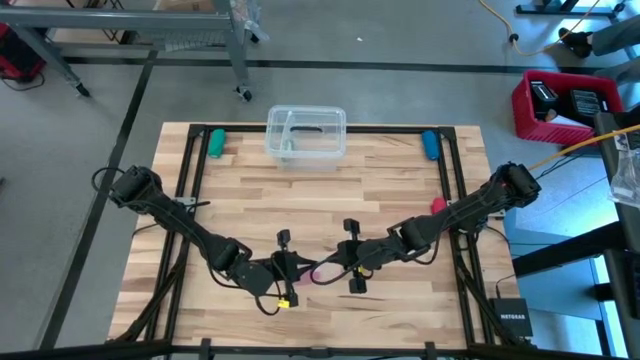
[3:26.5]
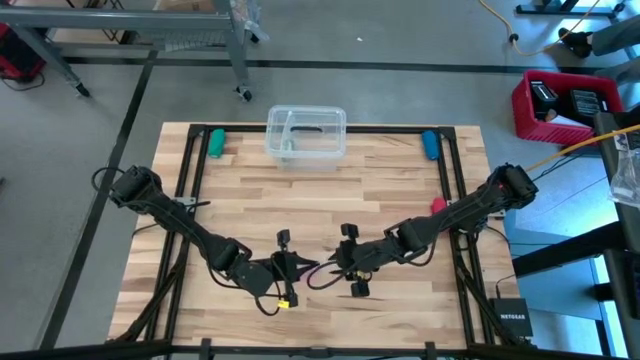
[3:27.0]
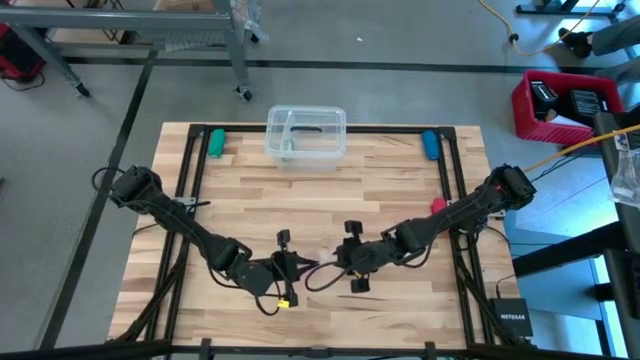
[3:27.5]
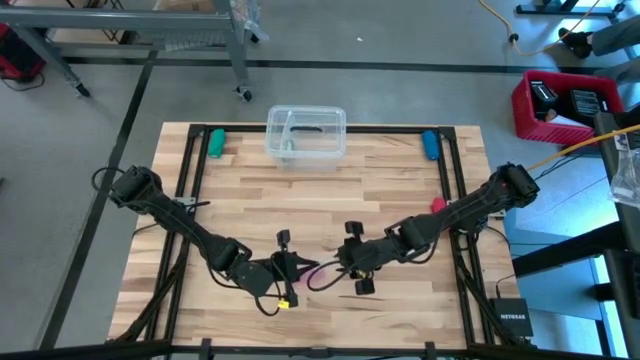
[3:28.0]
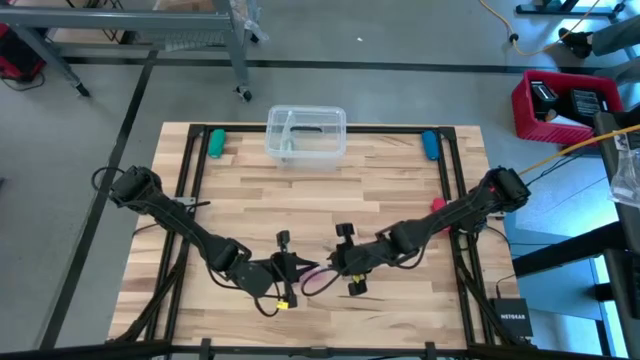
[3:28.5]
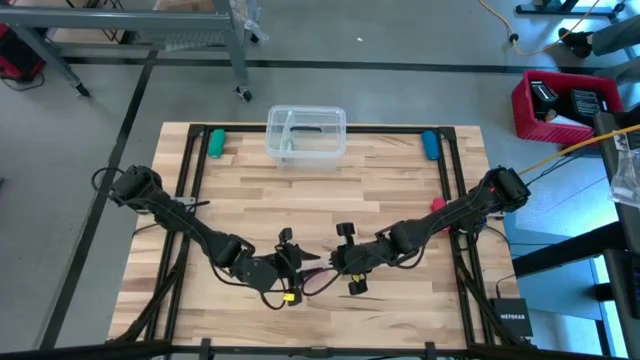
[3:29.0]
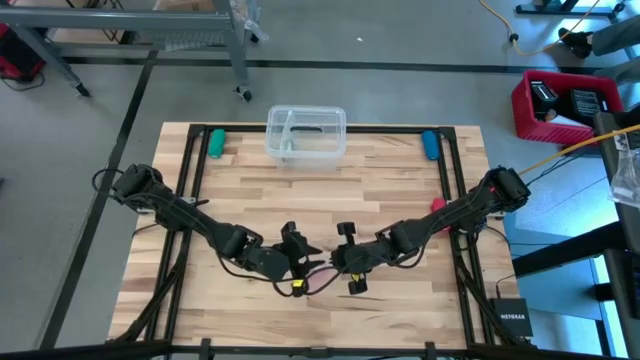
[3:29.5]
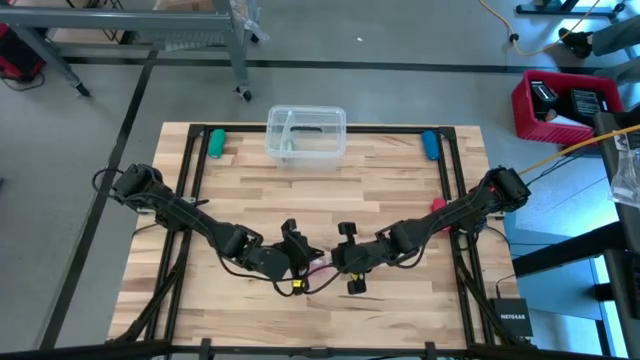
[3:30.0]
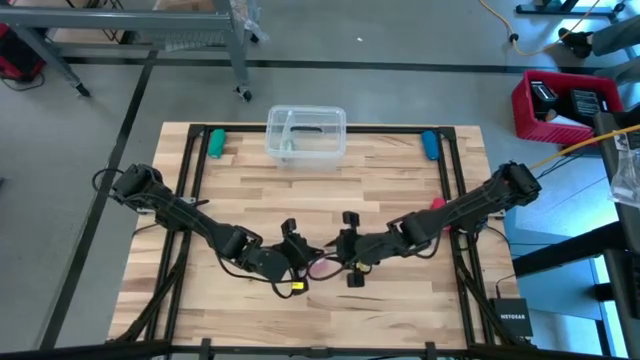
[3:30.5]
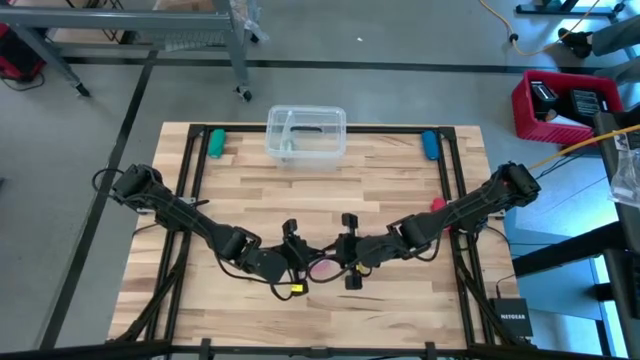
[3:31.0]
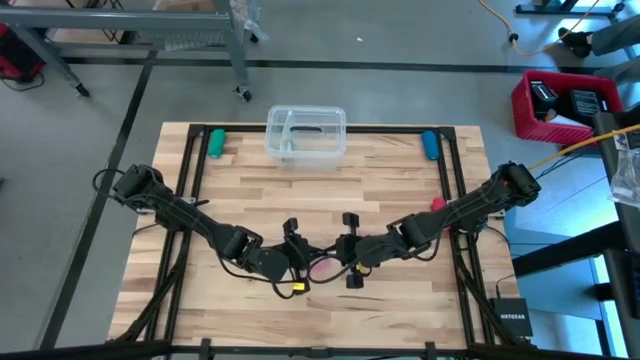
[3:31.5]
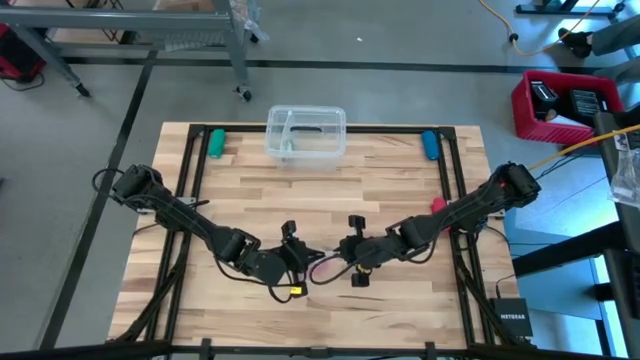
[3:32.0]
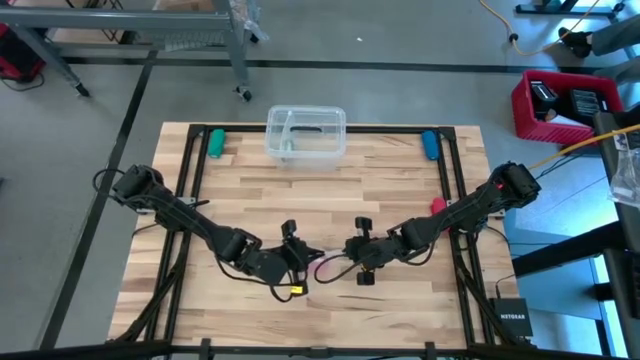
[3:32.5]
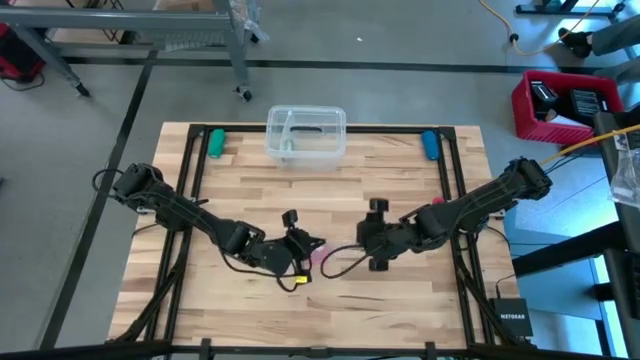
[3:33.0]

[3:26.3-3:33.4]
Task: Roll bandage
Close the transparent zip bag

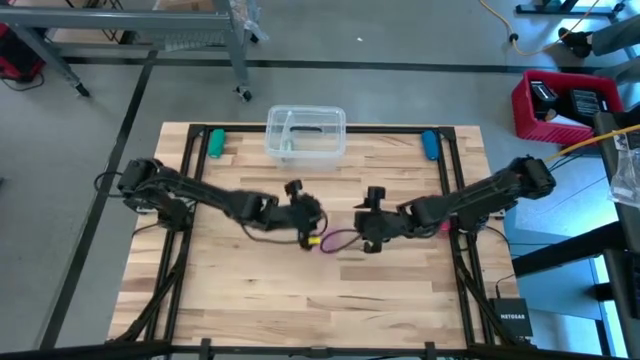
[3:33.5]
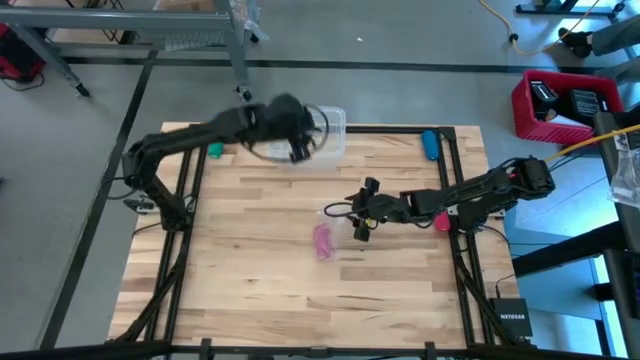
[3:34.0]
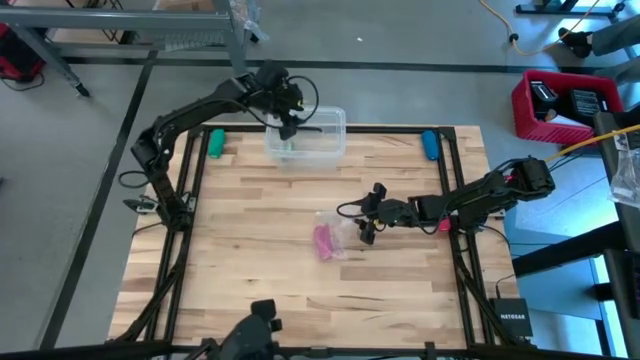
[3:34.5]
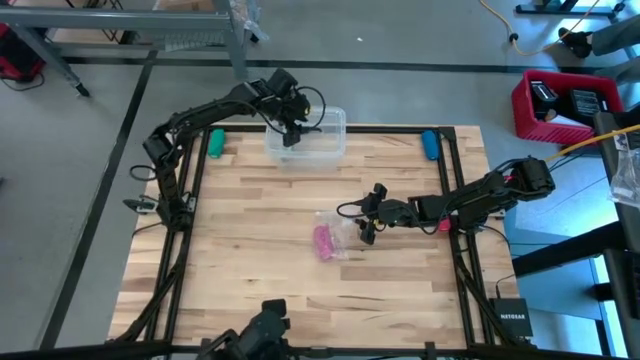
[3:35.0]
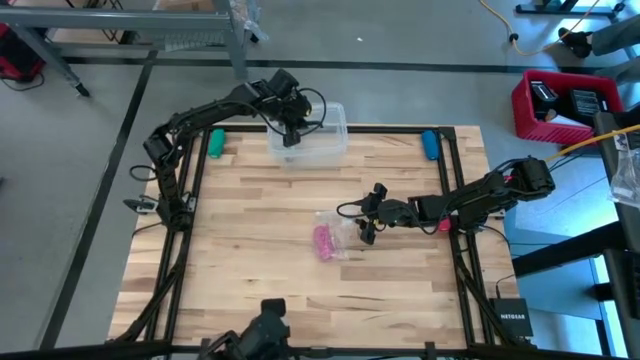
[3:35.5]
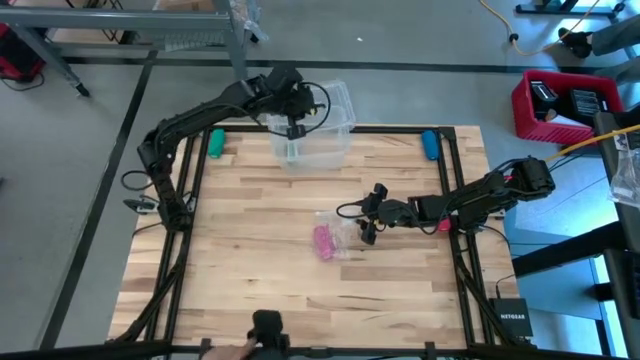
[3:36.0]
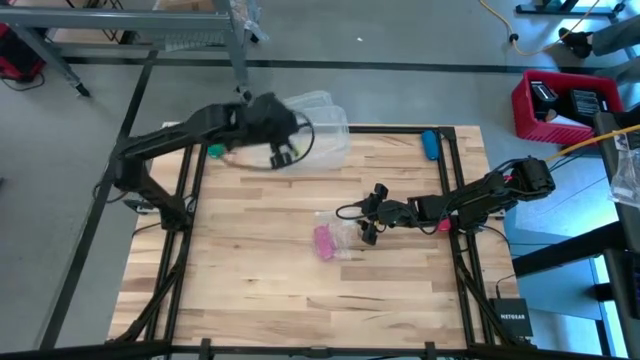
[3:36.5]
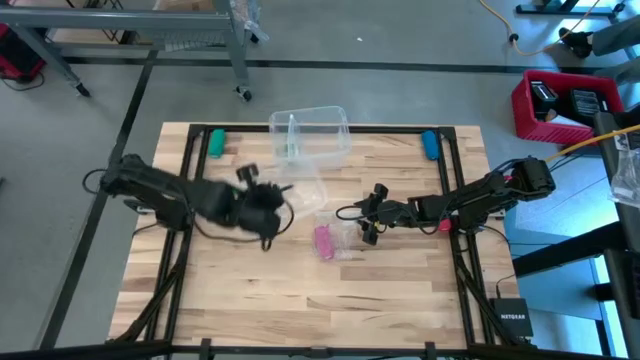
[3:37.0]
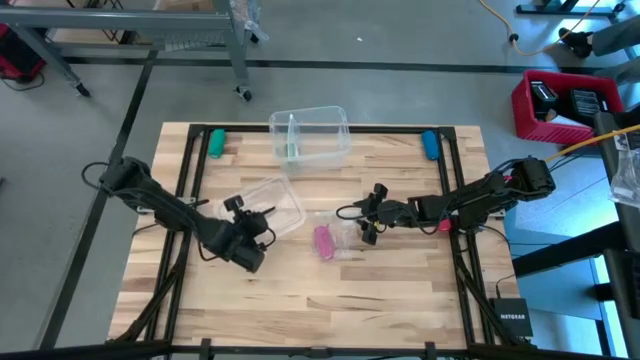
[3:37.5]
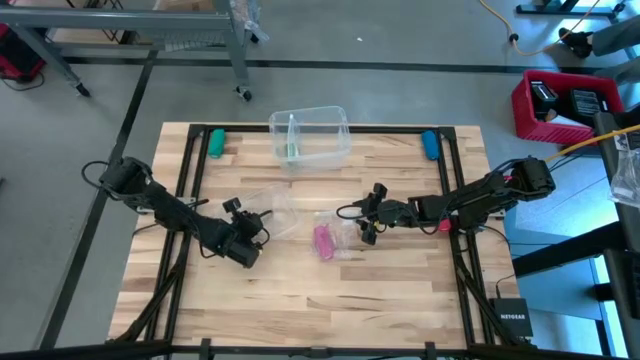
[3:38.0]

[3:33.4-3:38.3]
Open the cover of the container

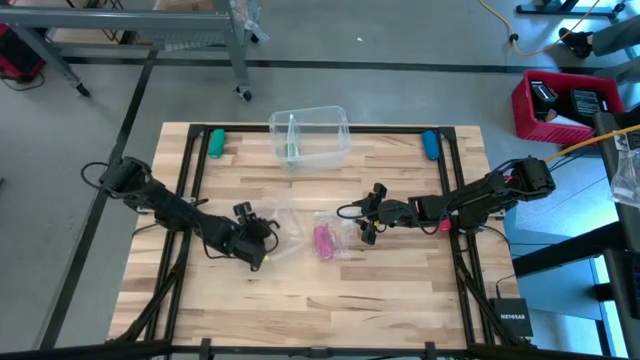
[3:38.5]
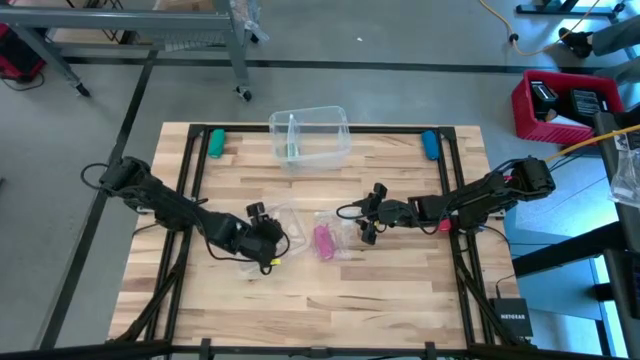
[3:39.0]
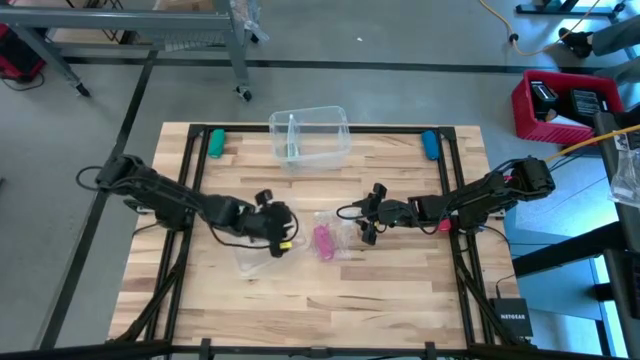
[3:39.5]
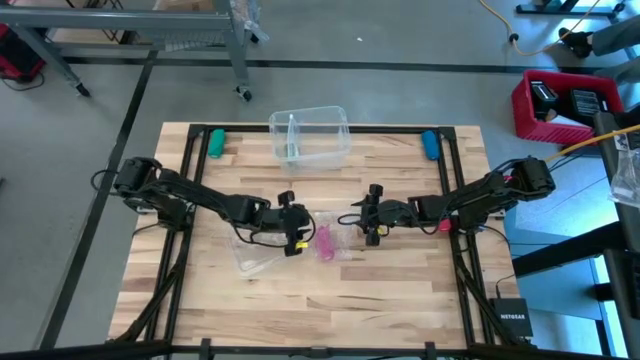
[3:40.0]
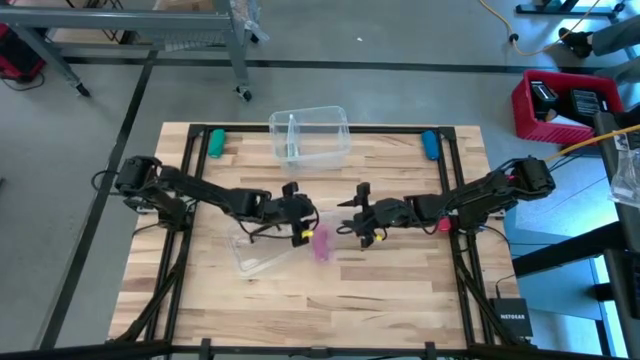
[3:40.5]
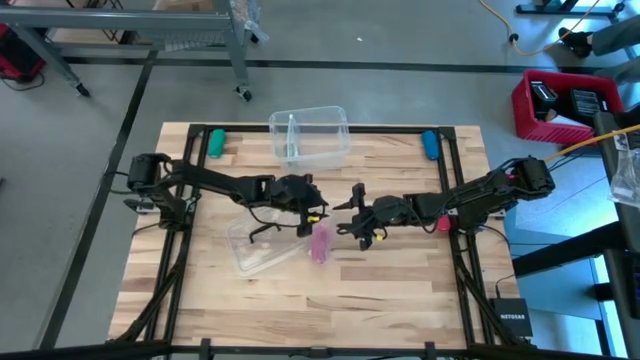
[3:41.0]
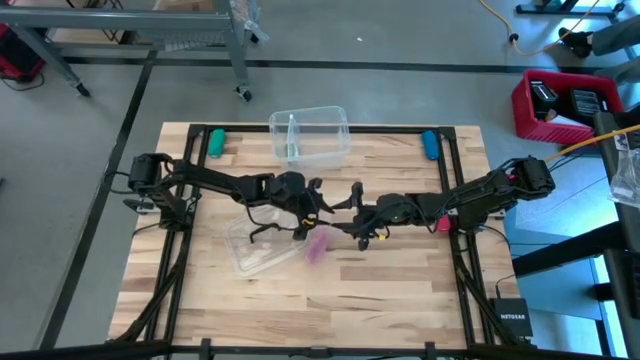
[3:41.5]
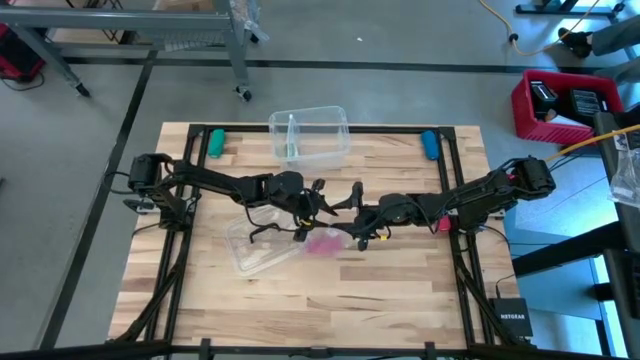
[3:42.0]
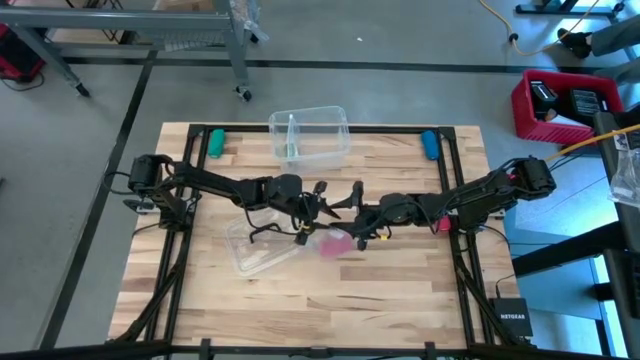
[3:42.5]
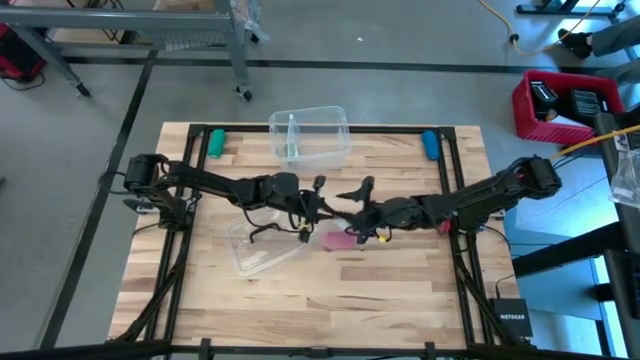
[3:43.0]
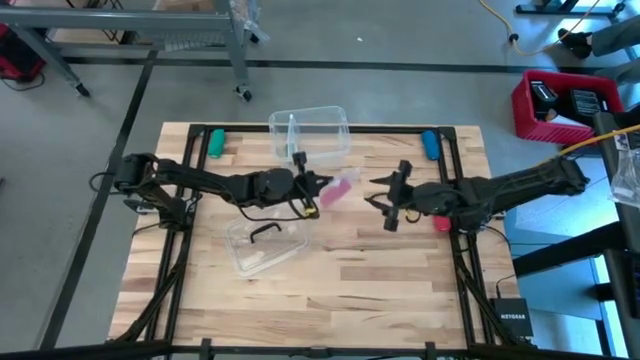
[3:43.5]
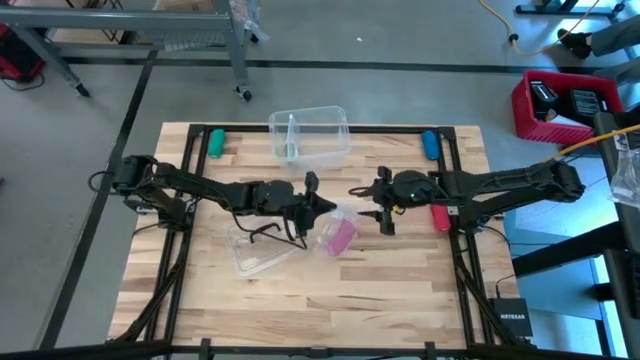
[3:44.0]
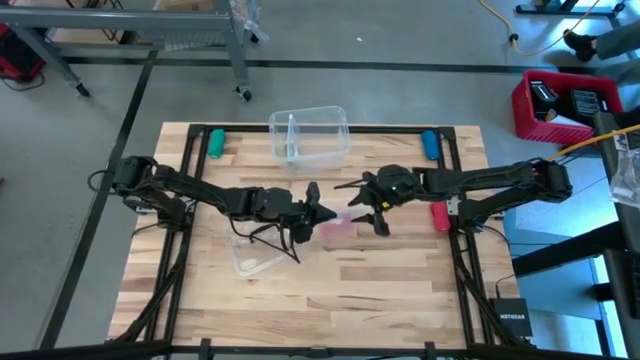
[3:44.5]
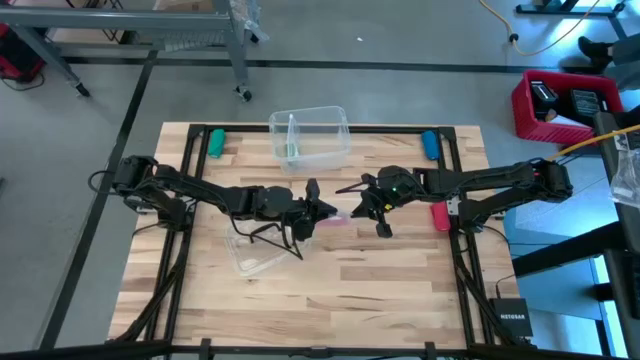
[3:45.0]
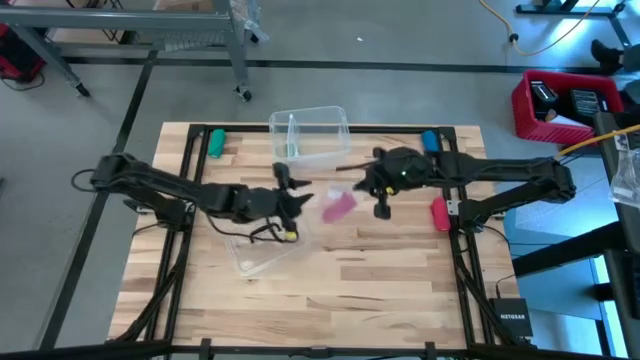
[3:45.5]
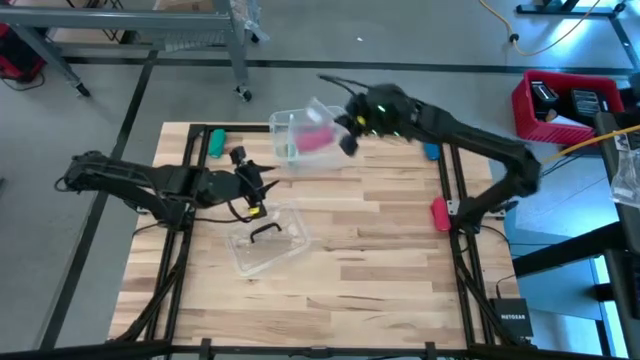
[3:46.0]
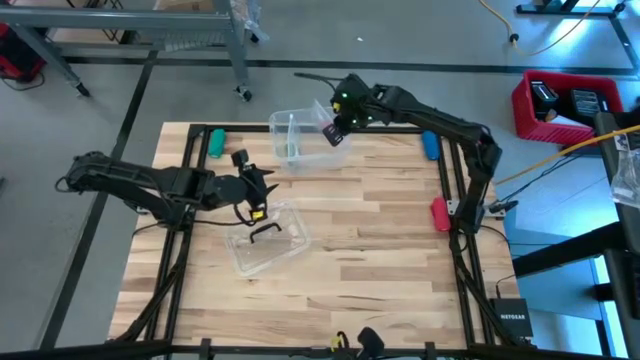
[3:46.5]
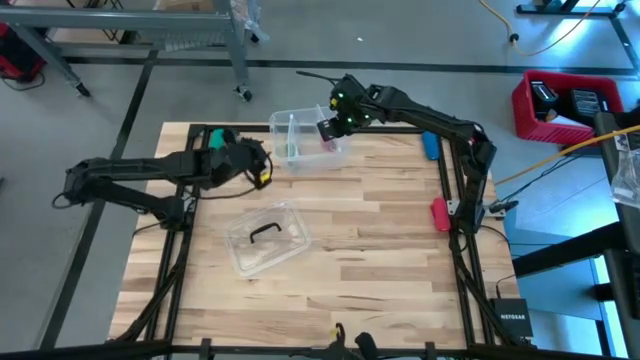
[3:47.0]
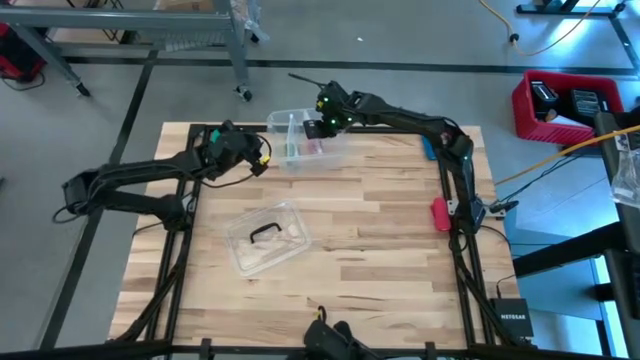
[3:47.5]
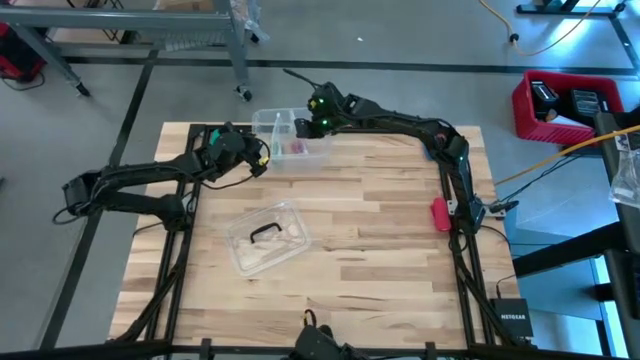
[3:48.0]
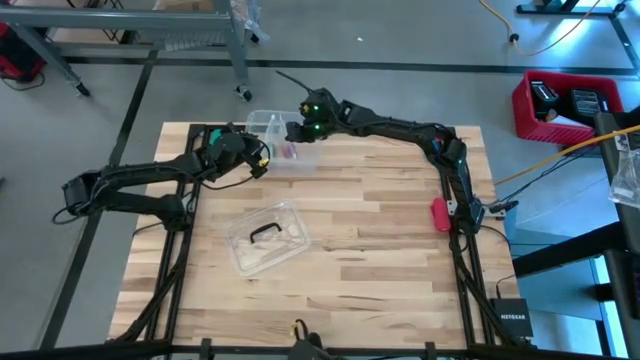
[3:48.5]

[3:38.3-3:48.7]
Put the transparent zip bag into the container
